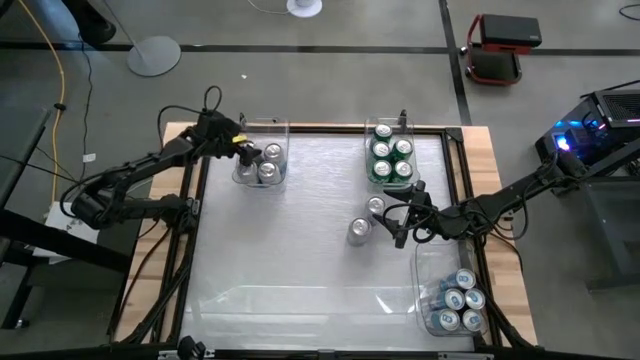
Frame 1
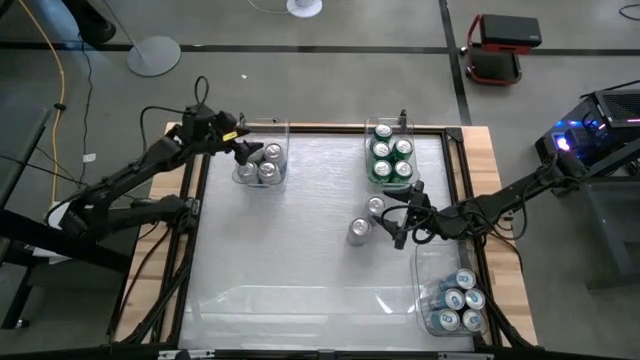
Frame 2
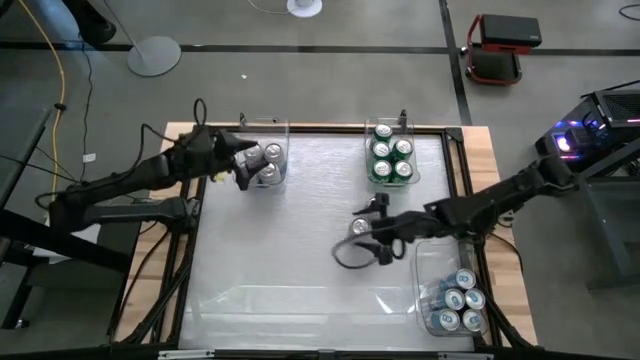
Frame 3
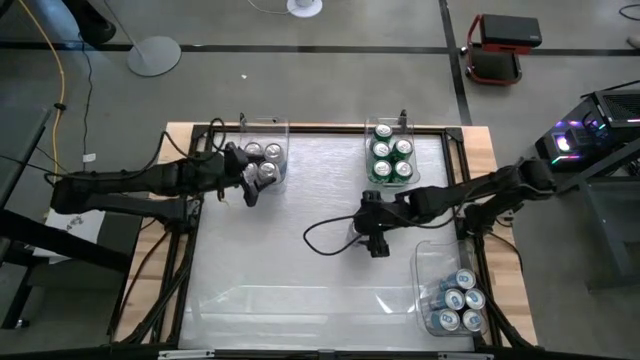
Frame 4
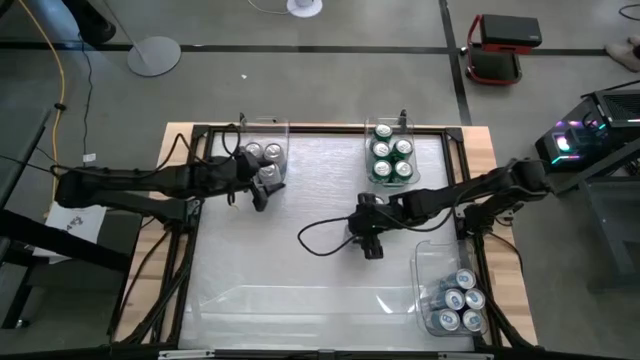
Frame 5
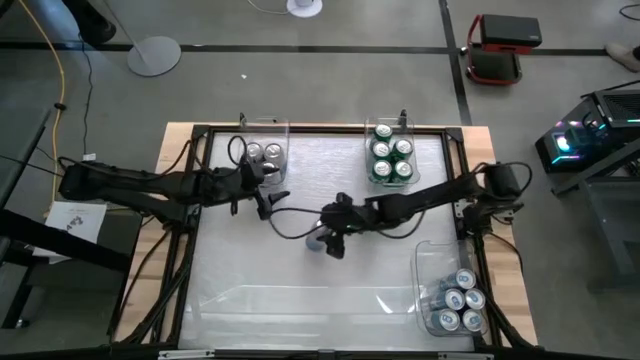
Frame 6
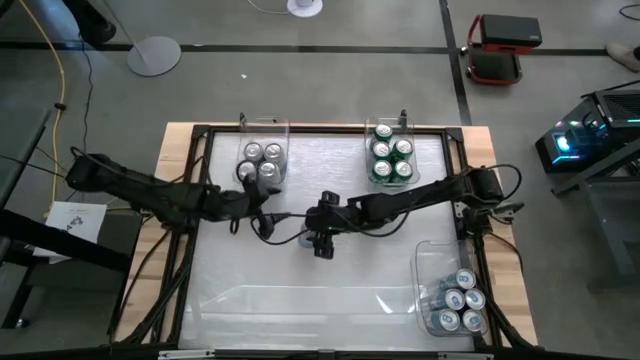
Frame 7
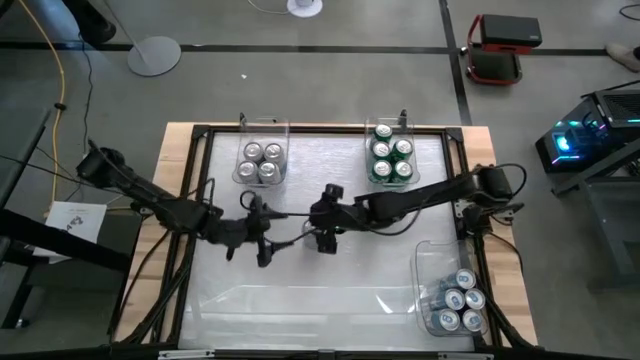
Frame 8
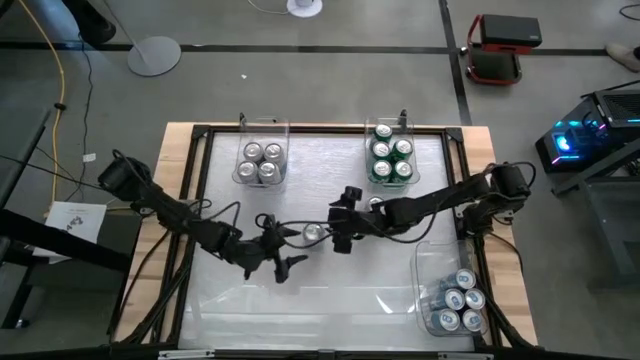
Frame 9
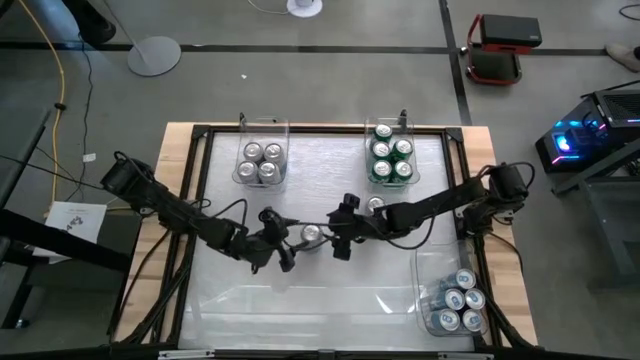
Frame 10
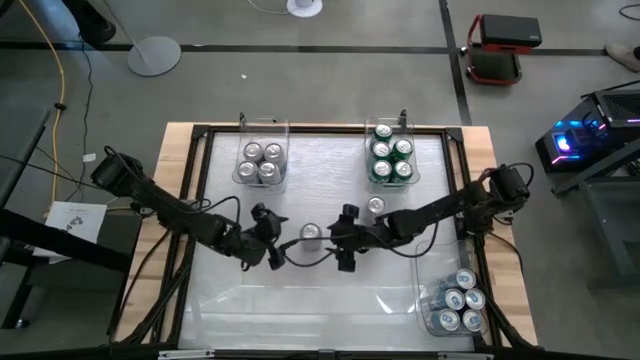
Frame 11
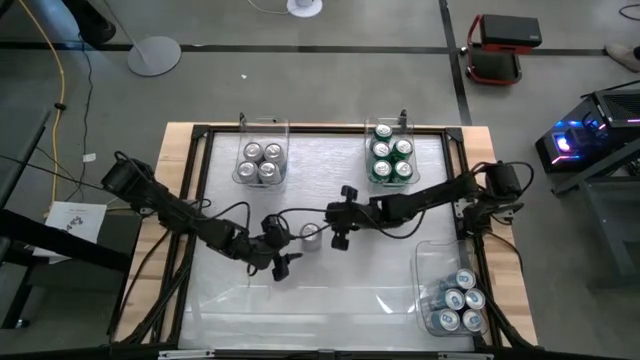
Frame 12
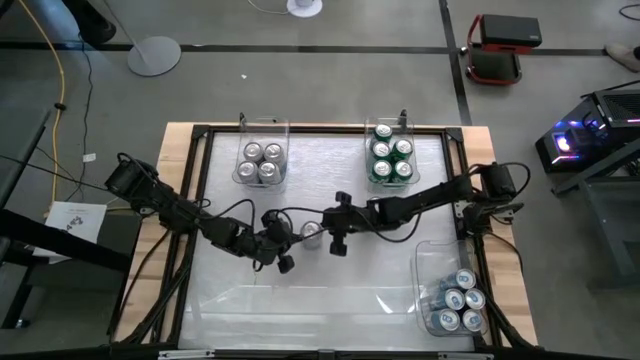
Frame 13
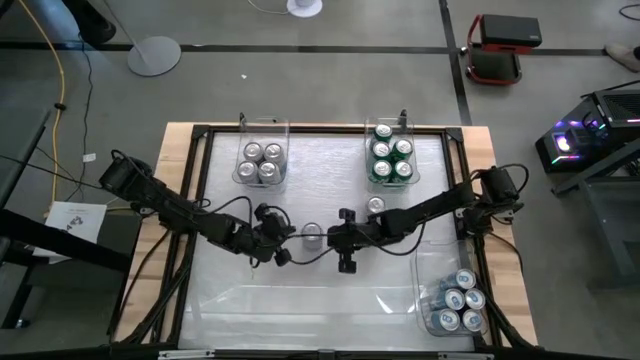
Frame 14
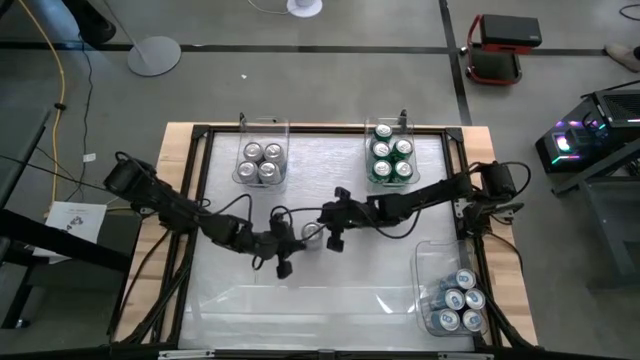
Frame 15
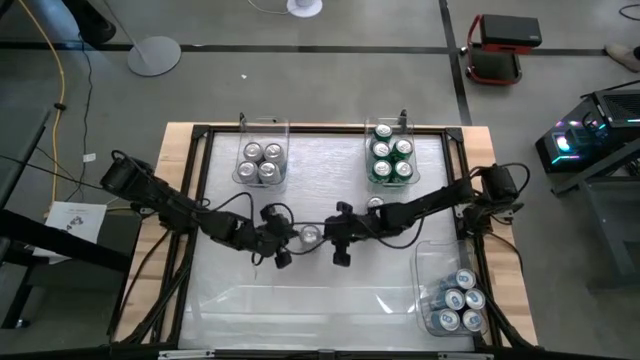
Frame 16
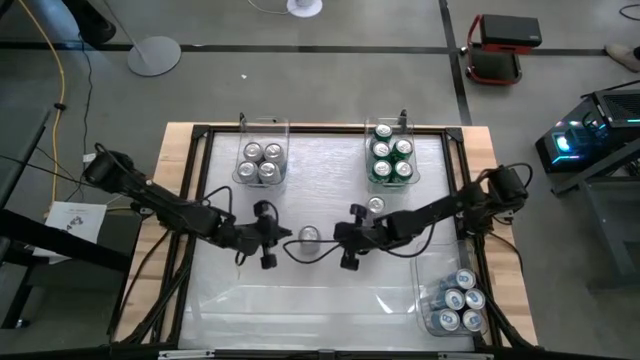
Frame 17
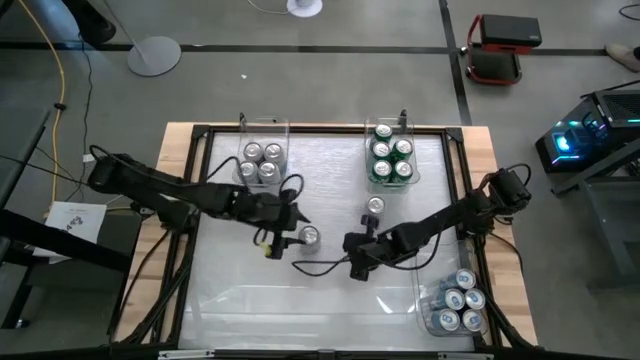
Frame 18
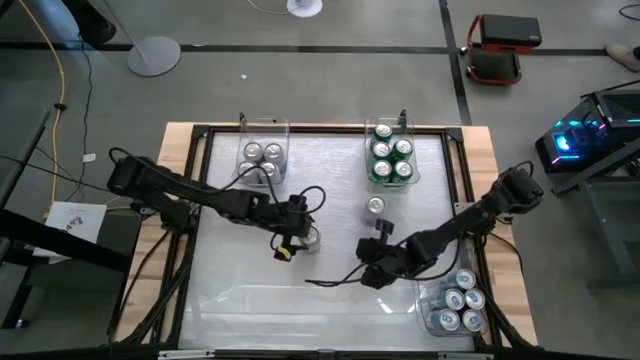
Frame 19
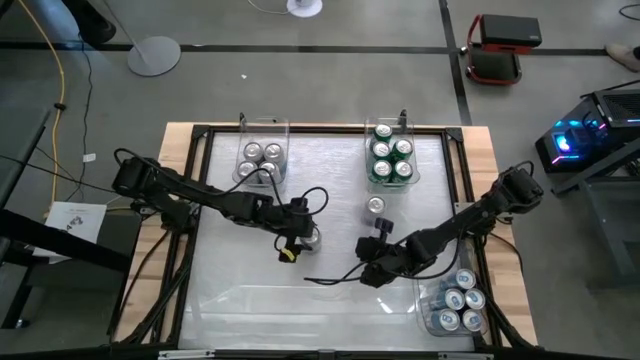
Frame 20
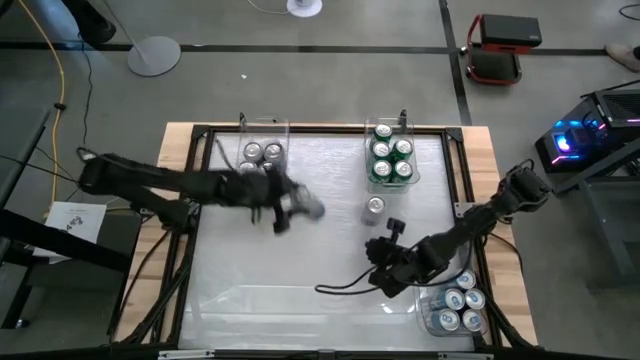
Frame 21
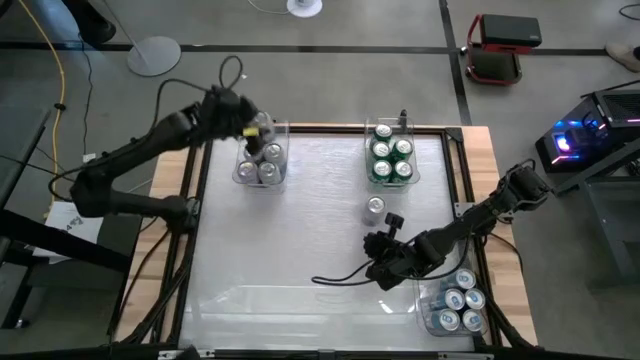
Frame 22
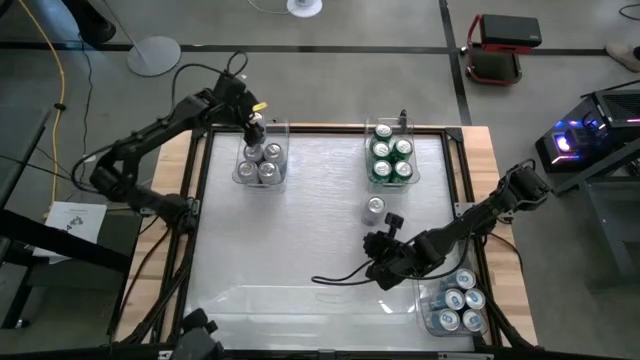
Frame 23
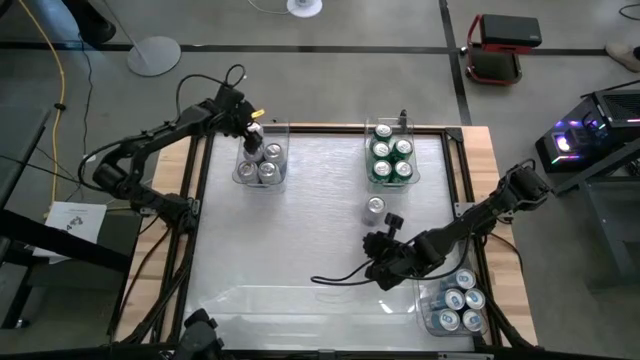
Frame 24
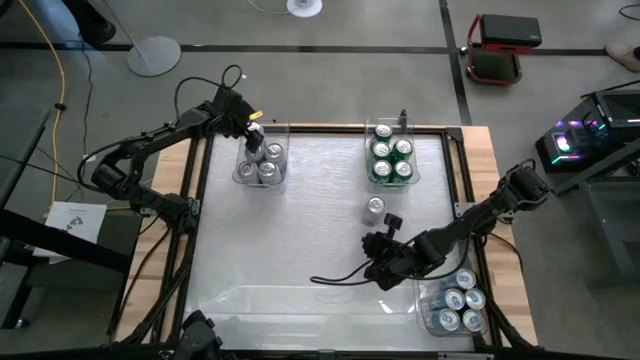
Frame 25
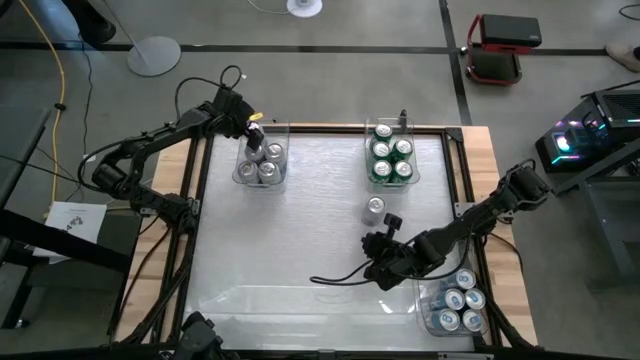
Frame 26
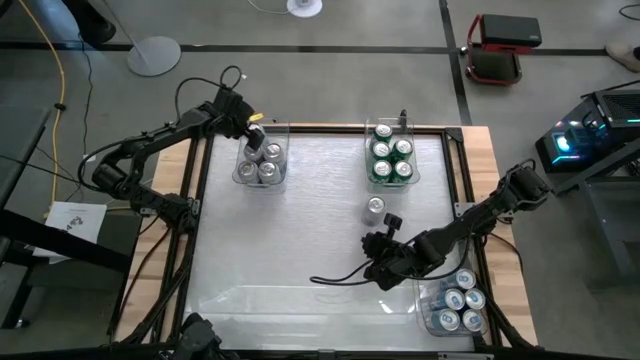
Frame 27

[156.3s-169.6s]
Task: Sort soda cans
Put the blue-white soda can into the top left transparent bin

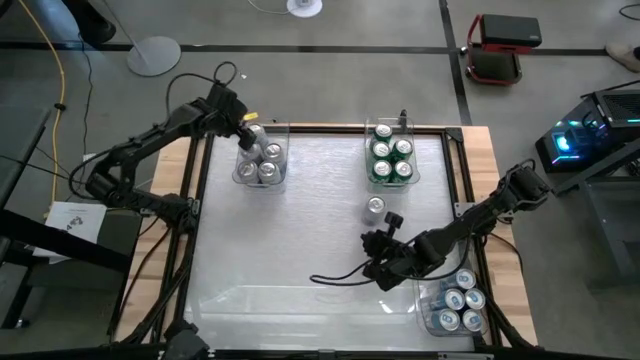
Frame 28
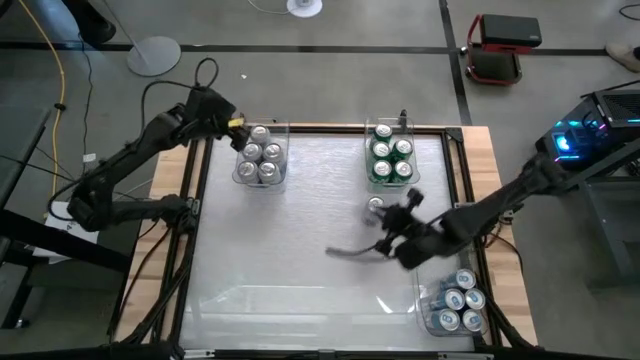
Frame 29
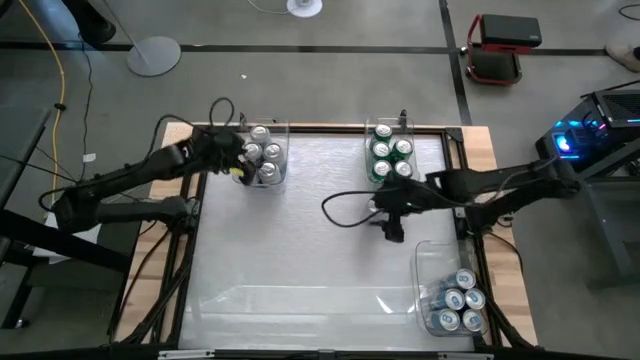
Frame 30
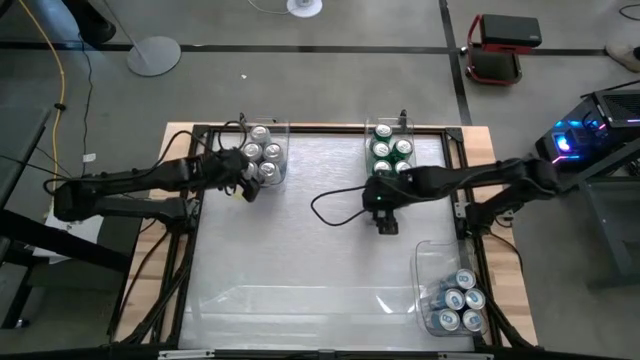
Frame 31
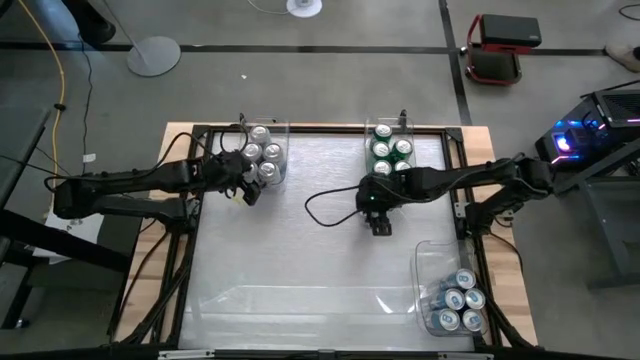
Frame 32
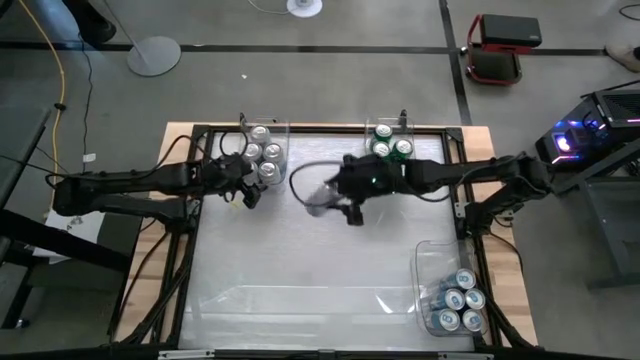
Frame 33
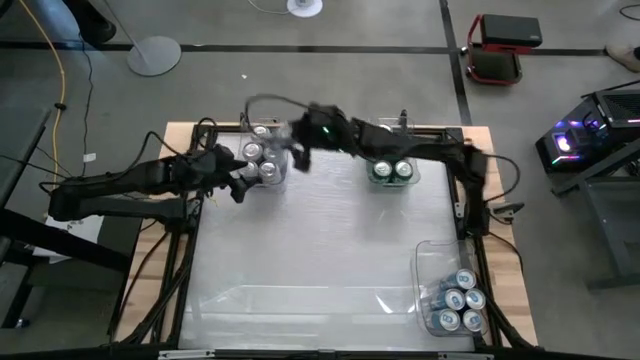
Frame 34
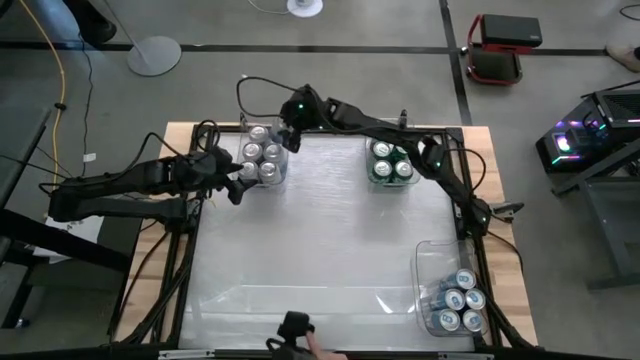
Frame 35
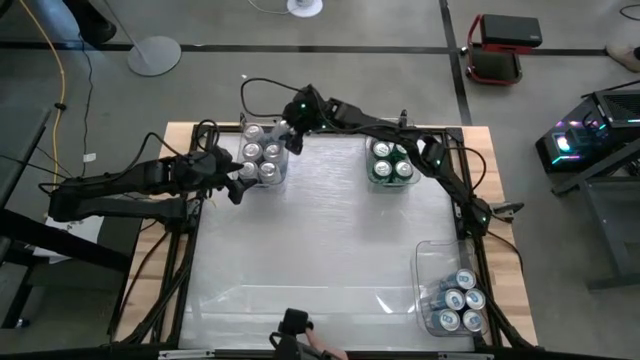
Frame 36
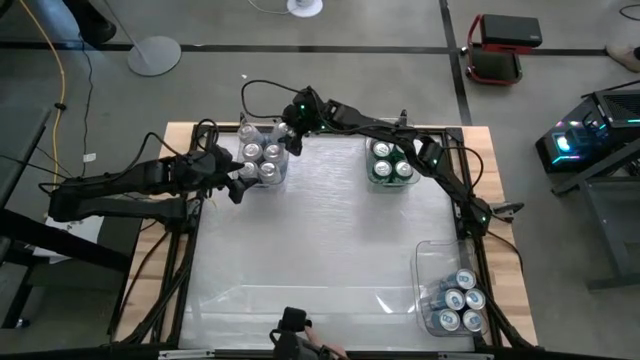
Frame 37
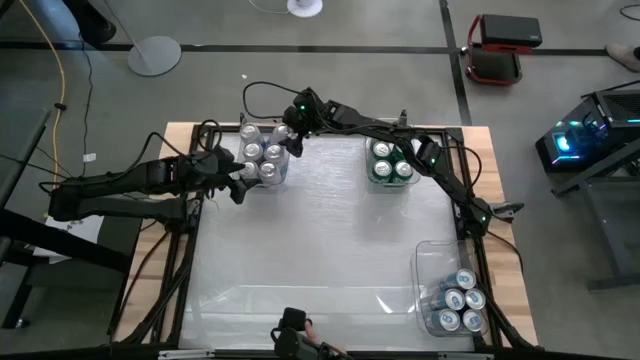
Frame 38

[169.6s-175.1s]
Put the blue-white soda can into the top left transparent bin
